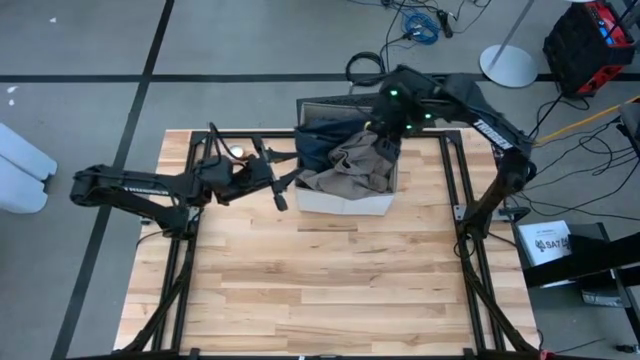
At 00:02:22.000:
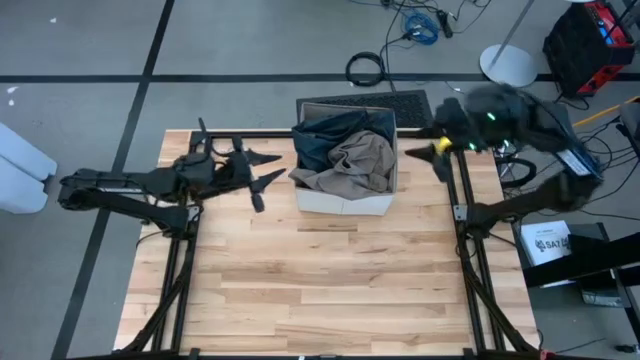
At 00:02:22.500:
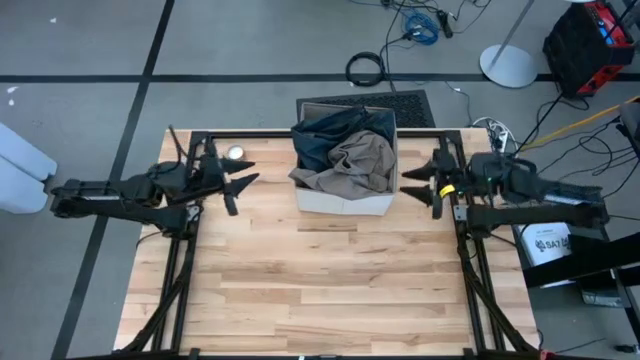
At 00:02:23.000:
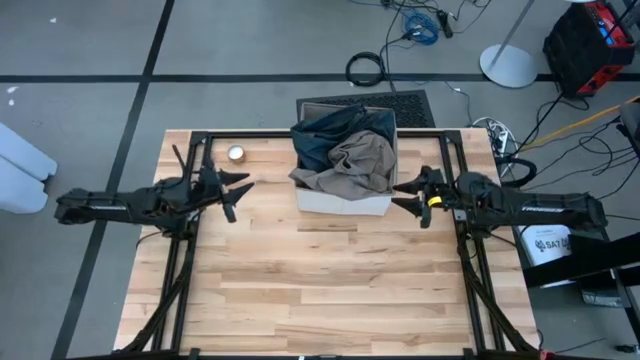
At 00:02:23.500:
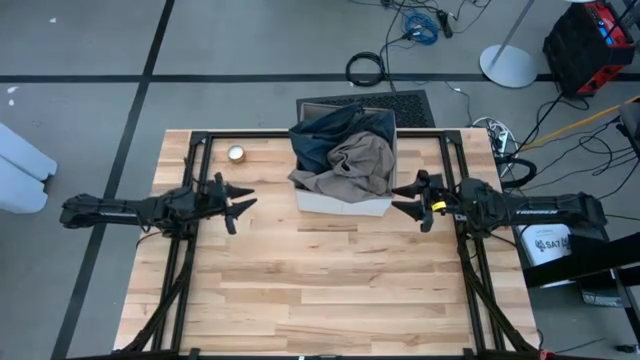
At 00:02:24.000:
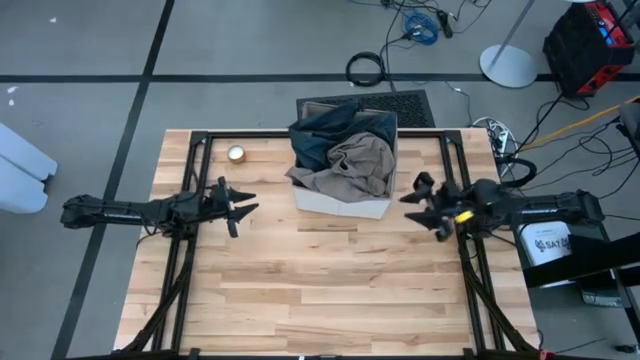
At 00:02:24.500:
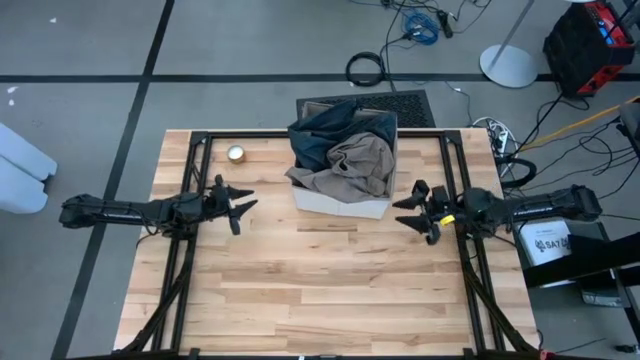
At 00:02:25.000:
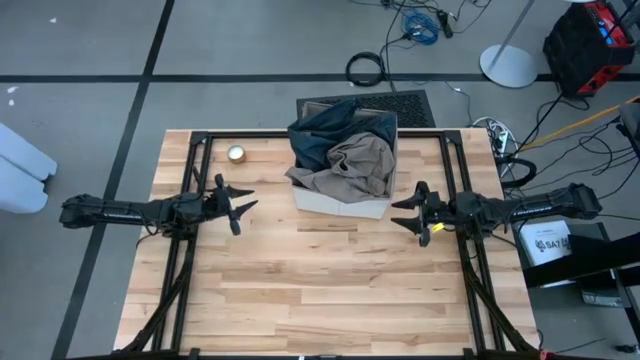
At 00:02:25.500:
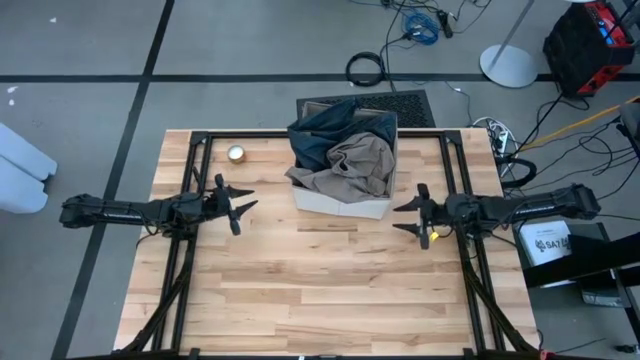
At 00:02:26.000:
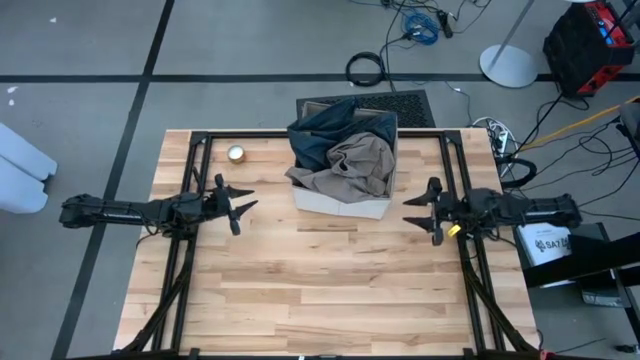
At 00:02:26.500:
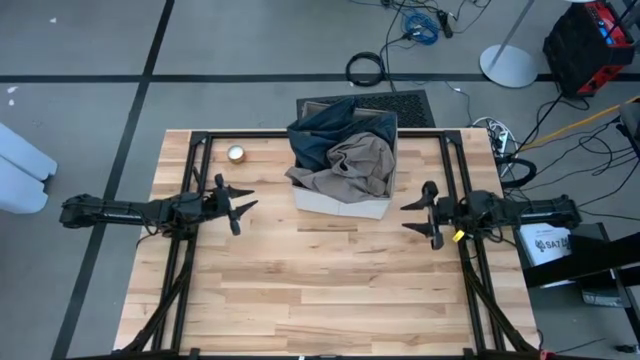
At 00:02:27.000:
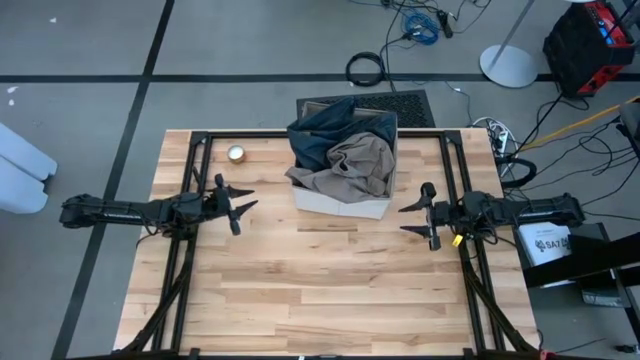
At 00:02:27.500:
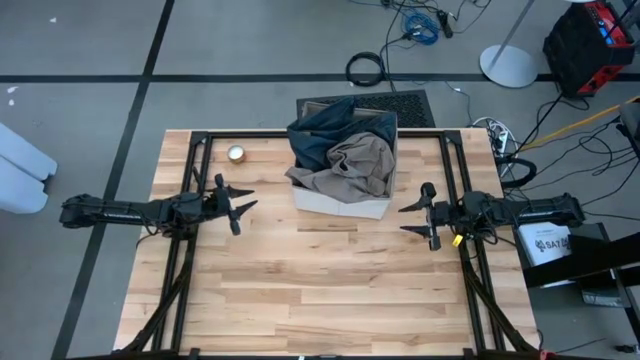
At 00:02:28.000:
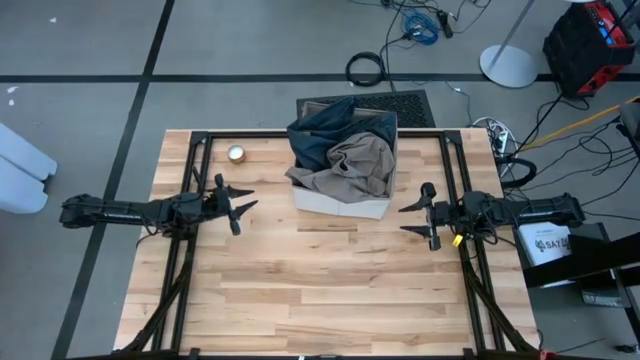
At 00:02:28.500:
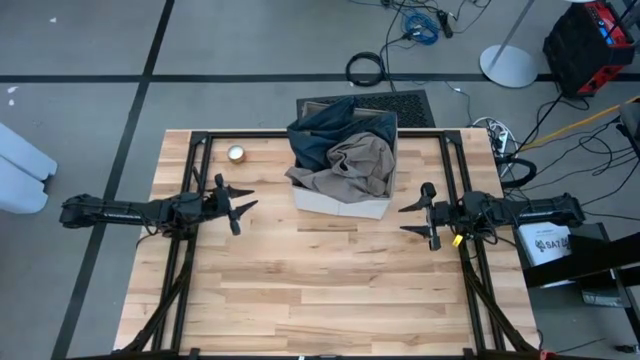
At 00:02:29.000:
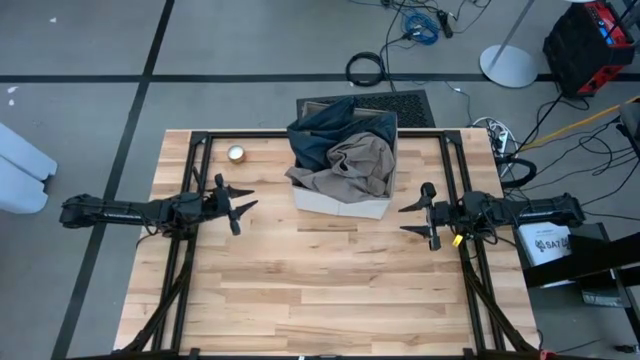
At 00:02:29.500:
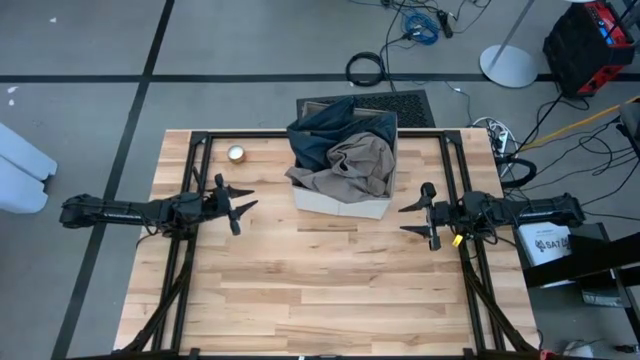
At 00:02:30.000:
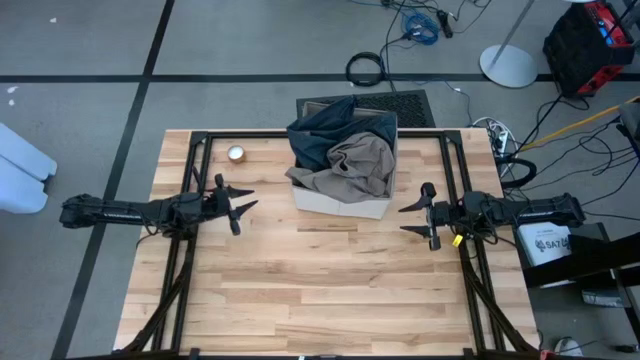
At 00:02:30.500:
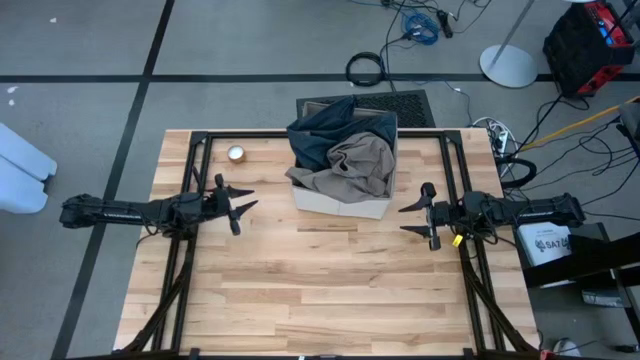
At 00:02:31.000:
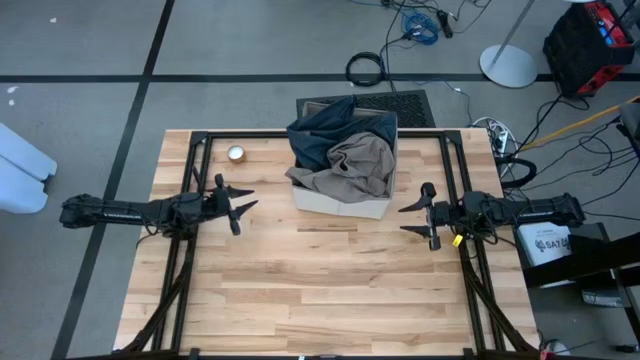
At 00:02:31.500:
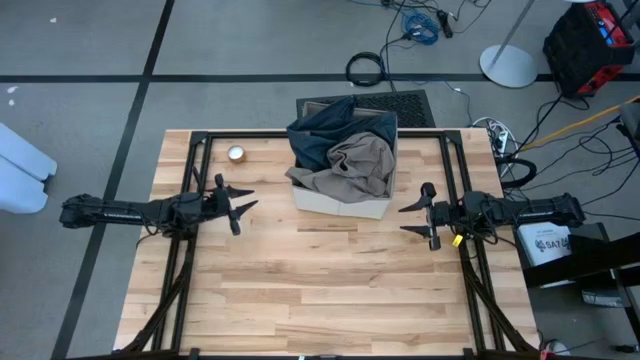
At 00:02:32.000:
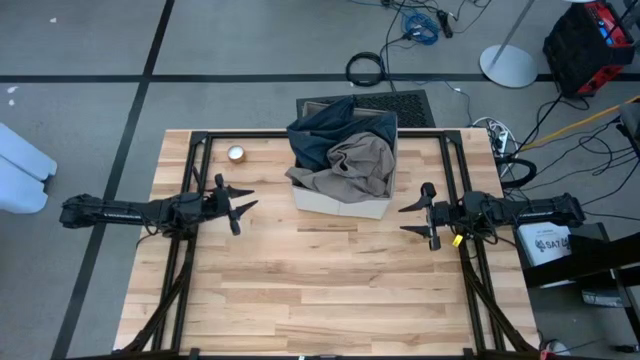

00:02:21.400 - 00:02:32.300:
Task: Sort clothes
Return to Home Position

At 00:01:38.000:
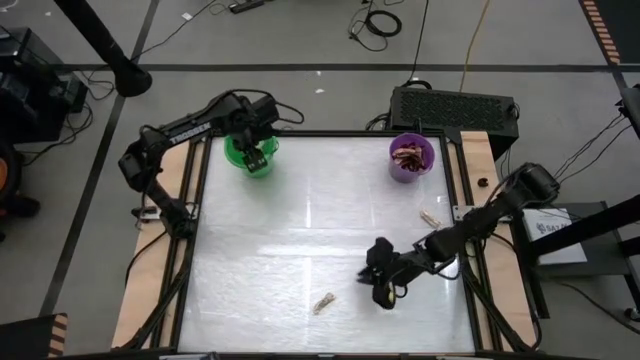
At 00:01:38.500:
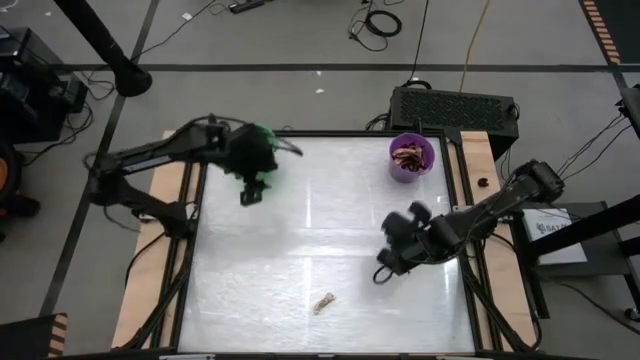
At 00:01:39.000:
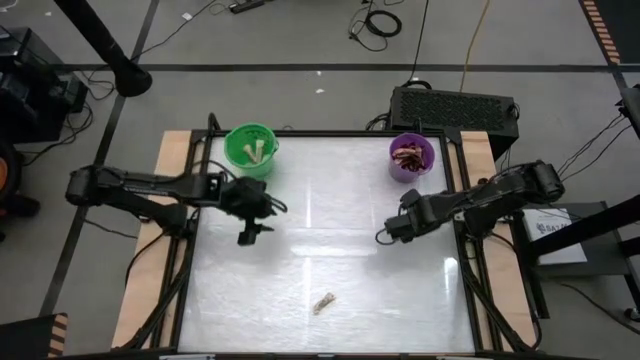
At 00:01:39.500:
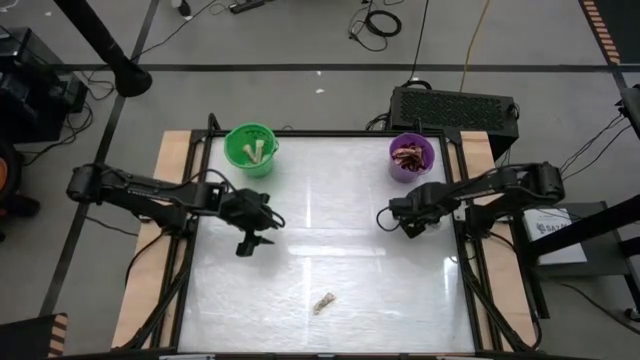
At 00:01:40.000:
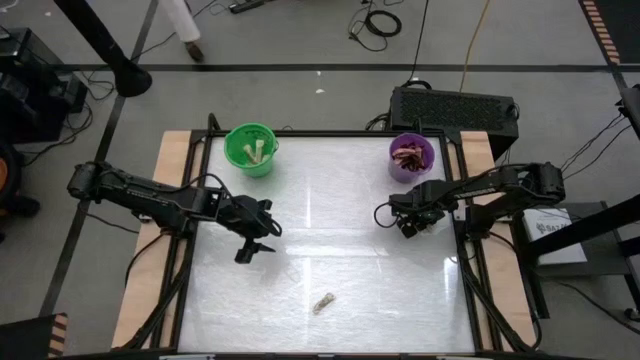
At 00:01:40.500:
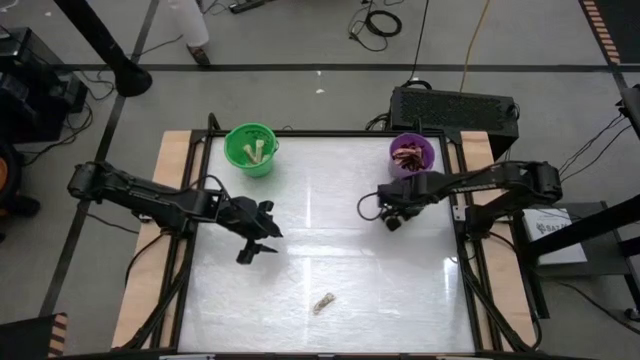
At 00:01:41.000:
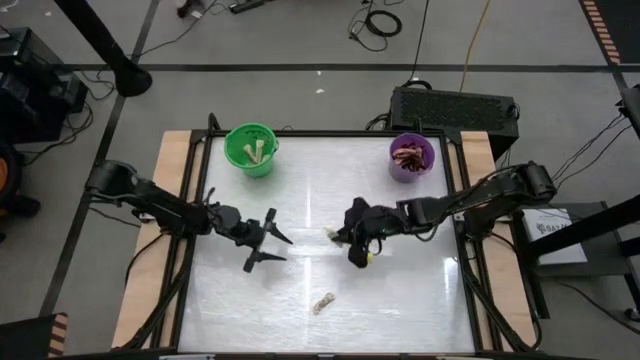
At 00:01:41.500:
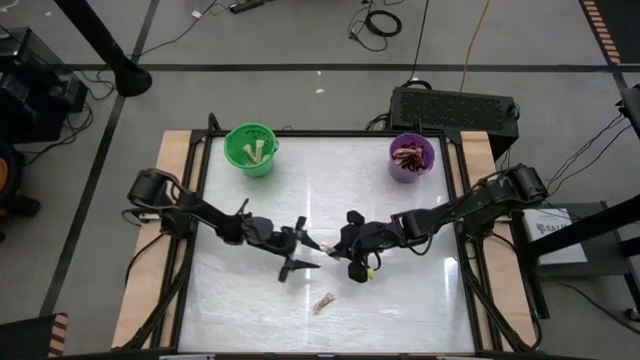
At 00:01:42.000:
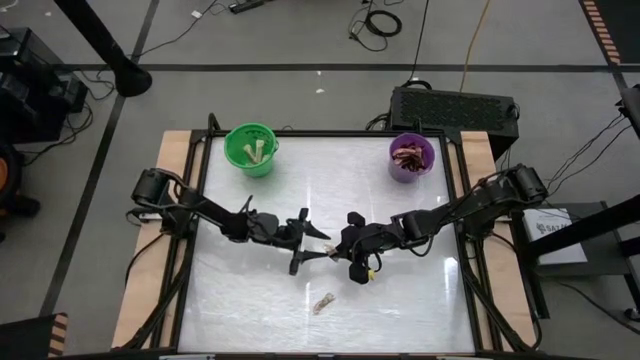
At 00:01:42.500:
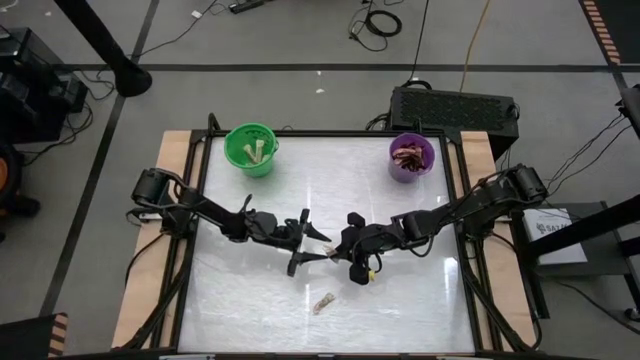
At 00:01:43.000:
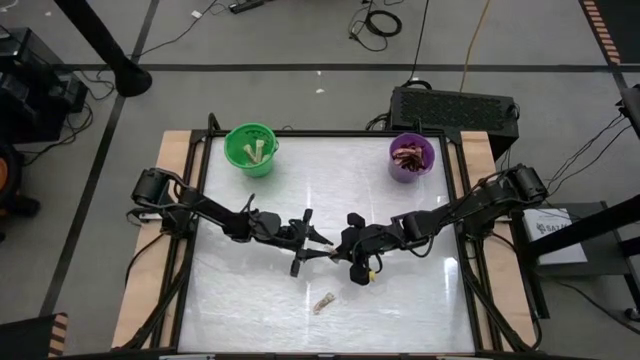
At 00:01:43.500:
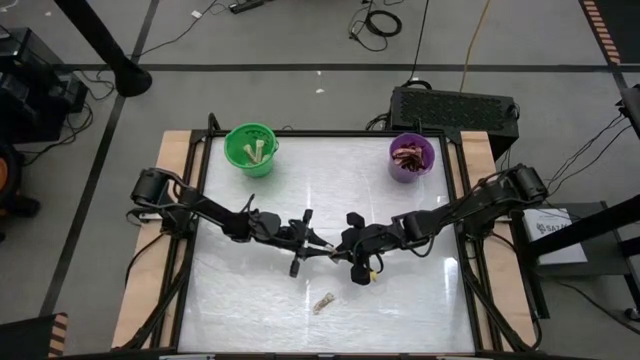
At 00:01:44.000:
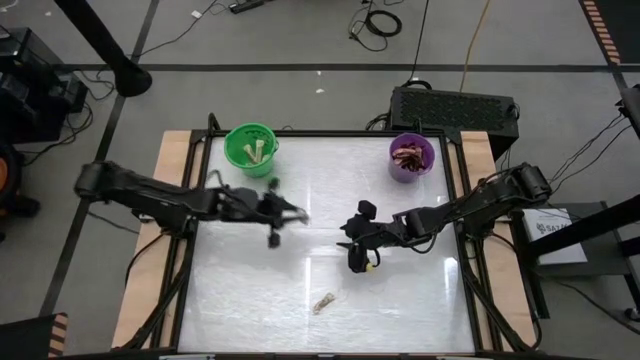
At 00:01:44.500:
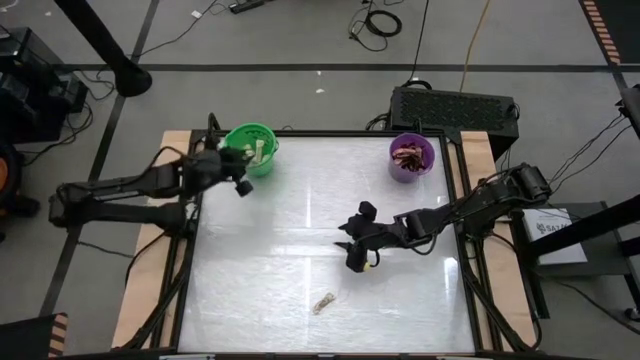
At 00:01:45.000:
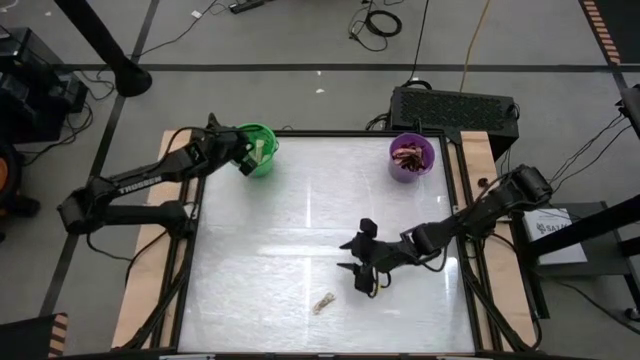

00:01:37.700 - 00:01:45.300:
Task: Sort candy by brand, put in halloween buckets
Put the white chocolate bar into the green bucket
